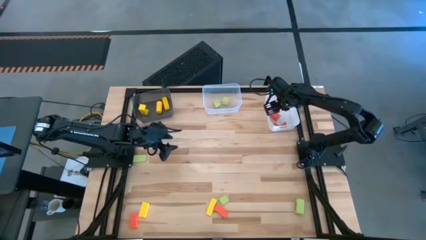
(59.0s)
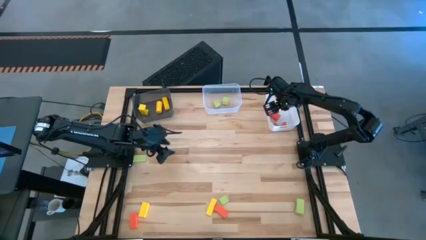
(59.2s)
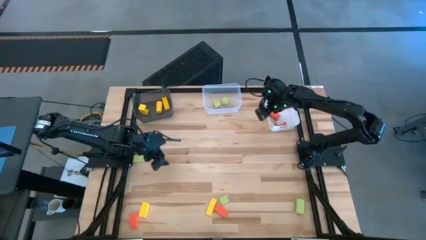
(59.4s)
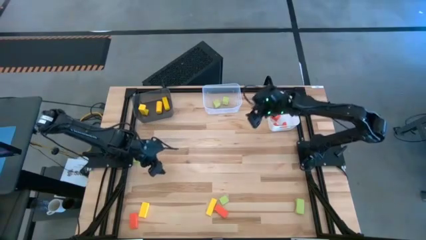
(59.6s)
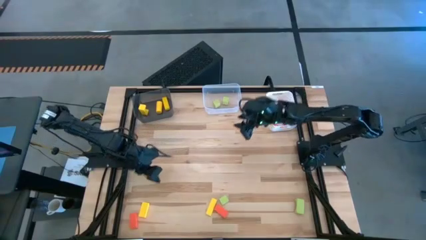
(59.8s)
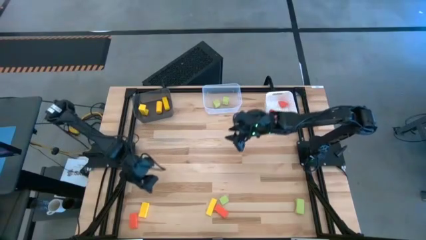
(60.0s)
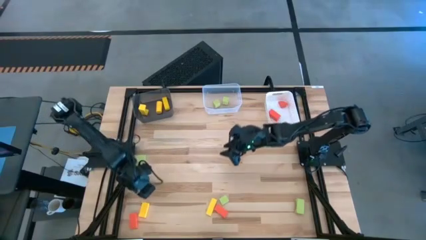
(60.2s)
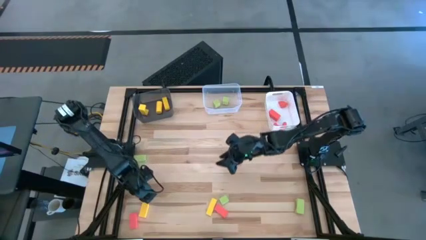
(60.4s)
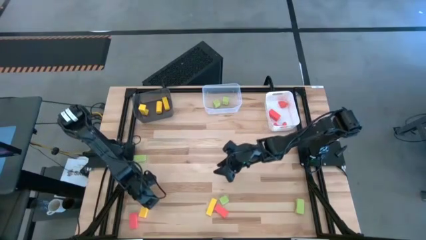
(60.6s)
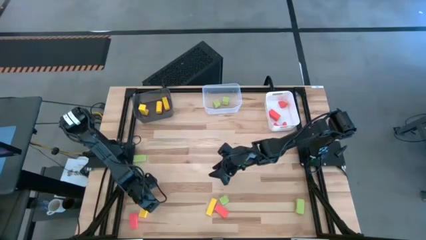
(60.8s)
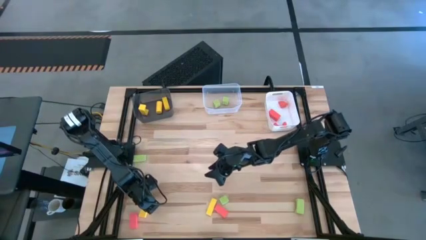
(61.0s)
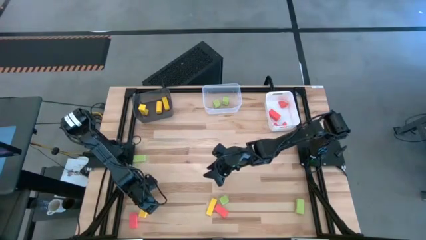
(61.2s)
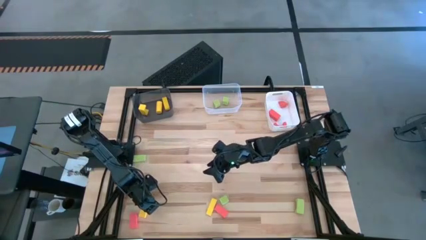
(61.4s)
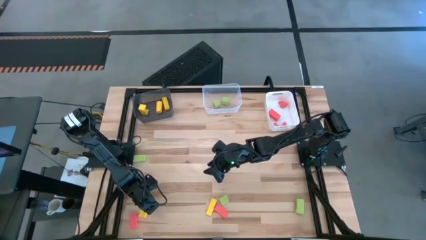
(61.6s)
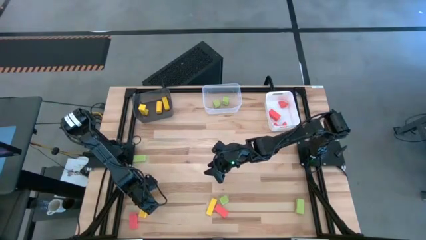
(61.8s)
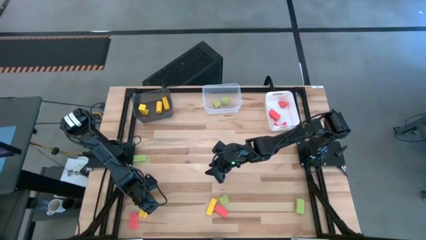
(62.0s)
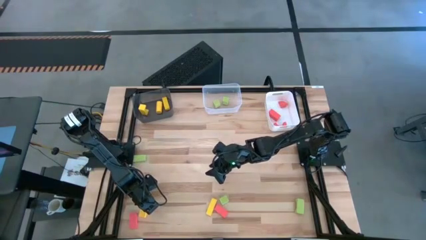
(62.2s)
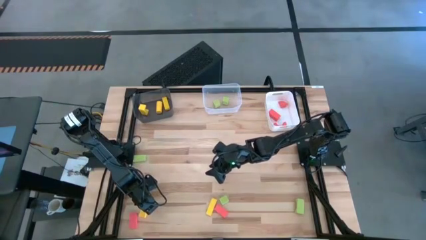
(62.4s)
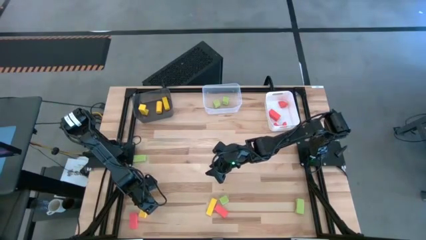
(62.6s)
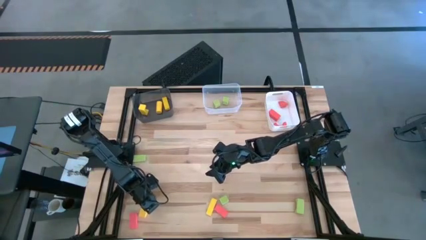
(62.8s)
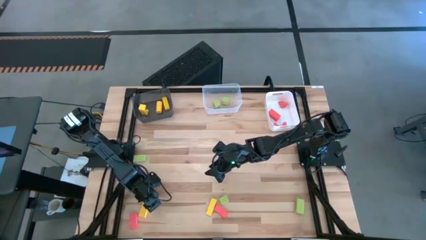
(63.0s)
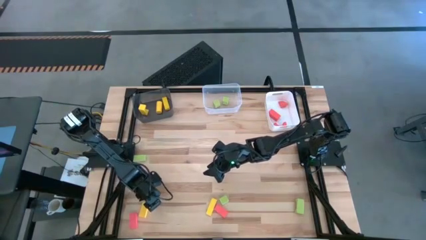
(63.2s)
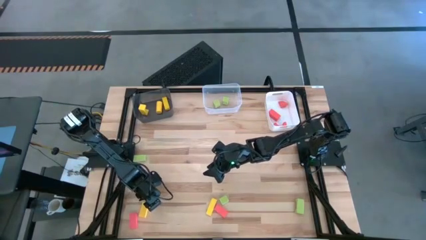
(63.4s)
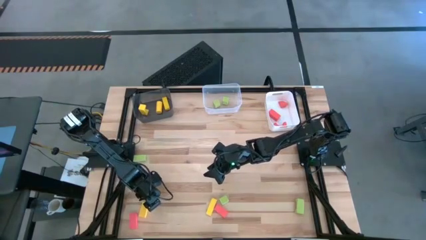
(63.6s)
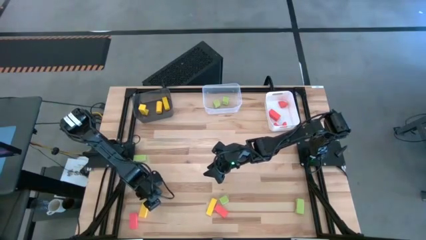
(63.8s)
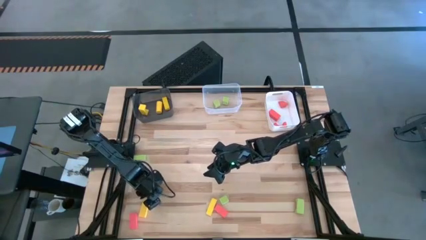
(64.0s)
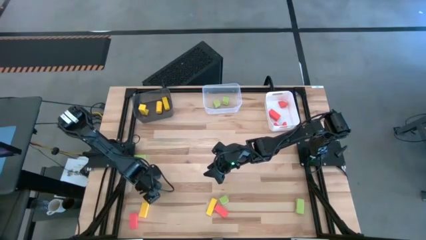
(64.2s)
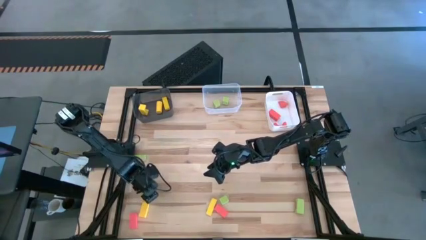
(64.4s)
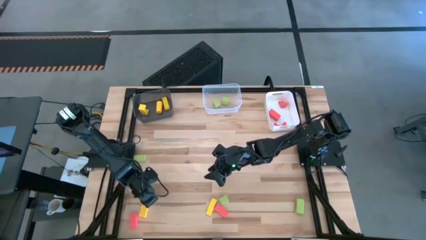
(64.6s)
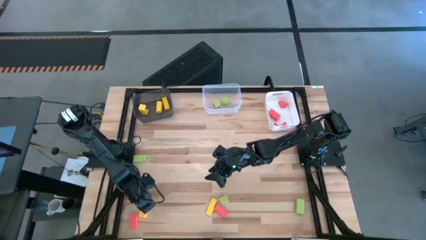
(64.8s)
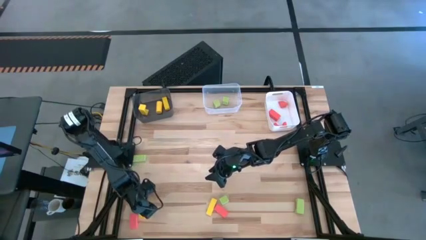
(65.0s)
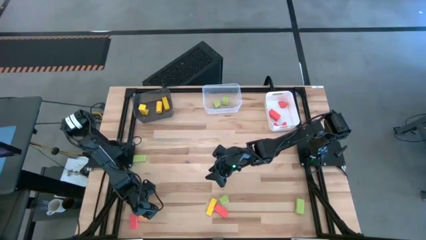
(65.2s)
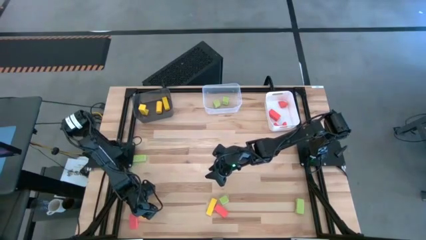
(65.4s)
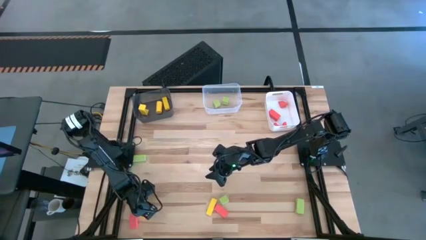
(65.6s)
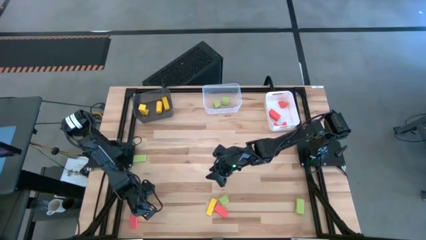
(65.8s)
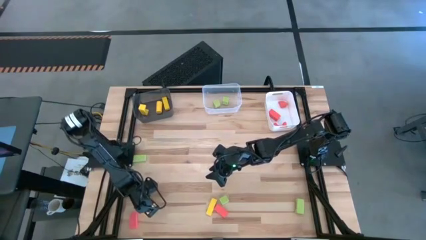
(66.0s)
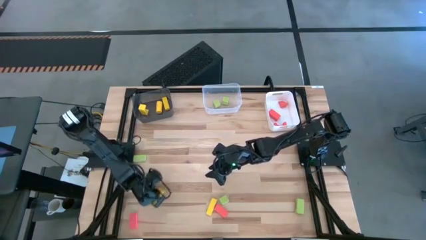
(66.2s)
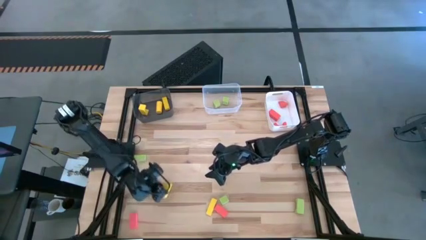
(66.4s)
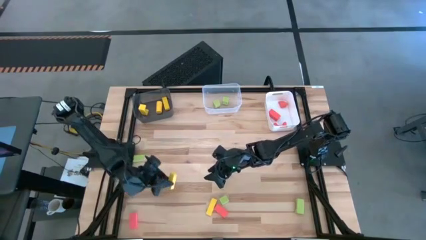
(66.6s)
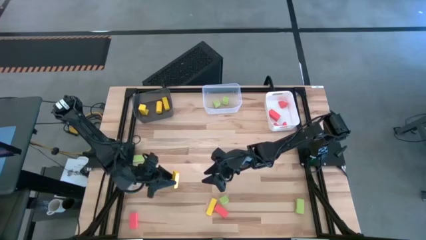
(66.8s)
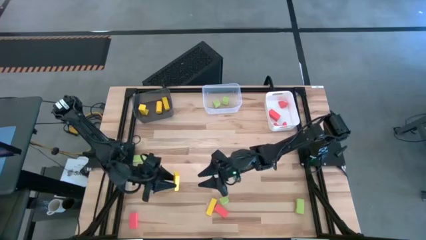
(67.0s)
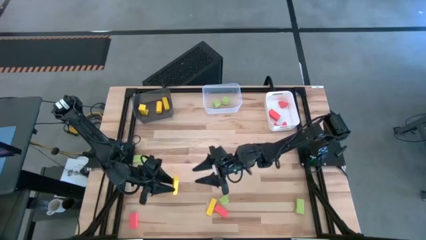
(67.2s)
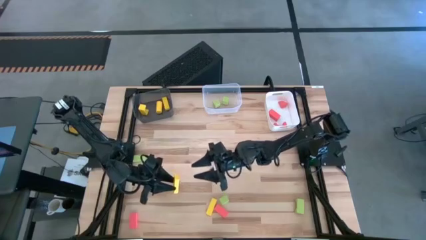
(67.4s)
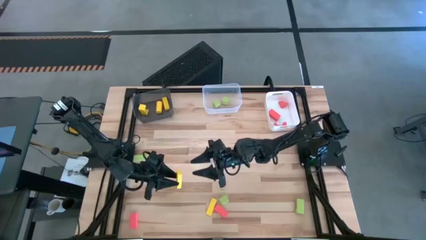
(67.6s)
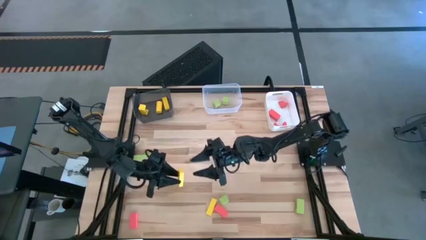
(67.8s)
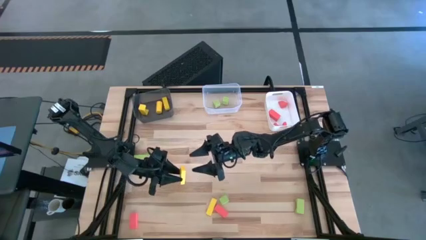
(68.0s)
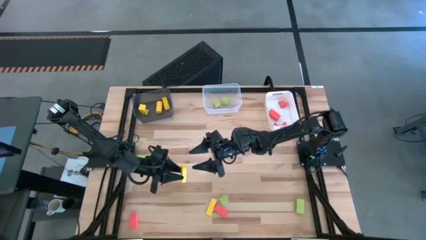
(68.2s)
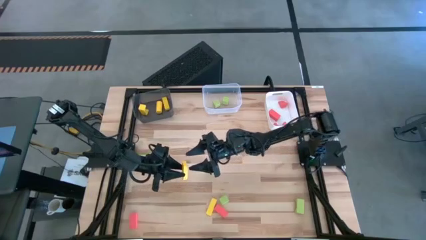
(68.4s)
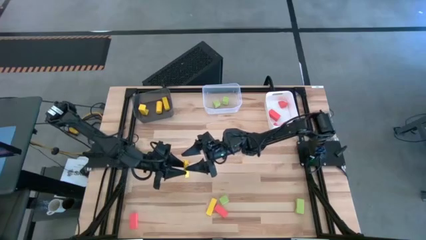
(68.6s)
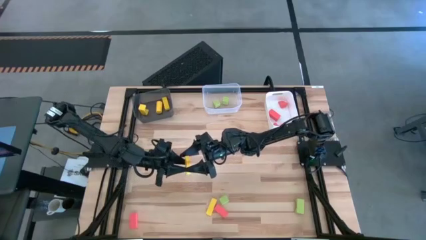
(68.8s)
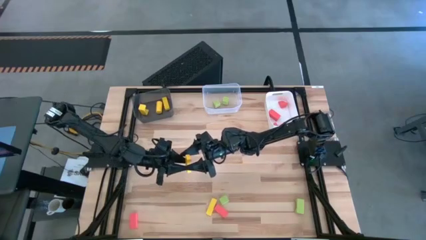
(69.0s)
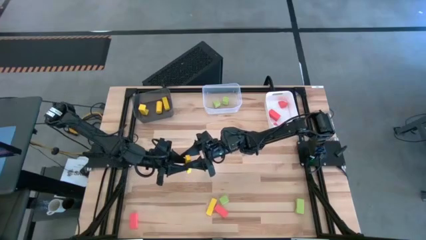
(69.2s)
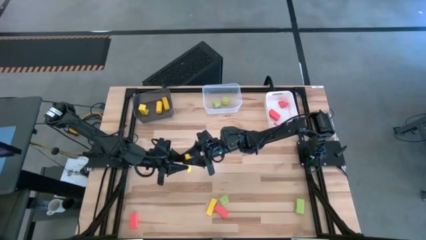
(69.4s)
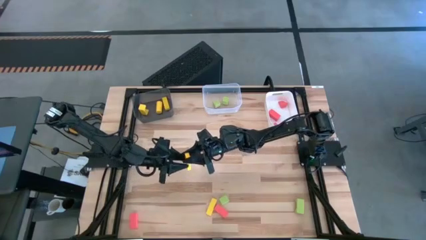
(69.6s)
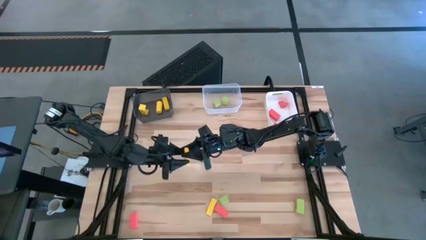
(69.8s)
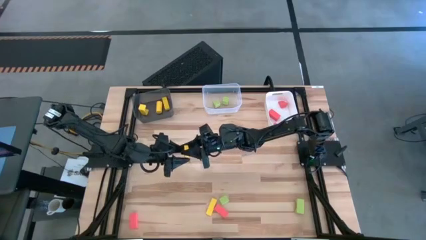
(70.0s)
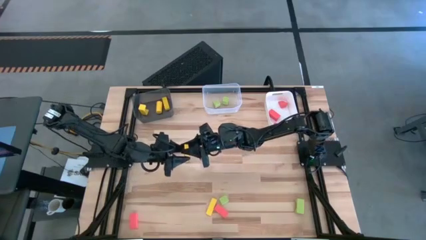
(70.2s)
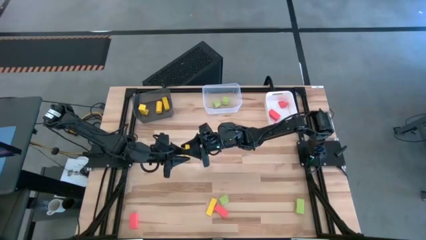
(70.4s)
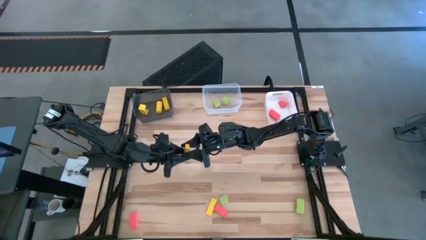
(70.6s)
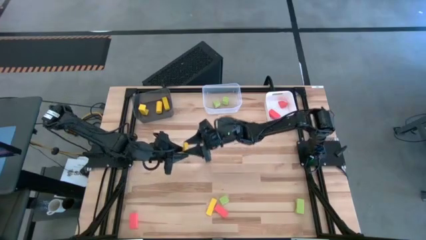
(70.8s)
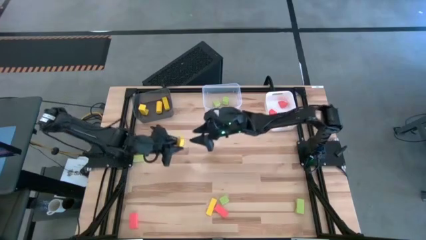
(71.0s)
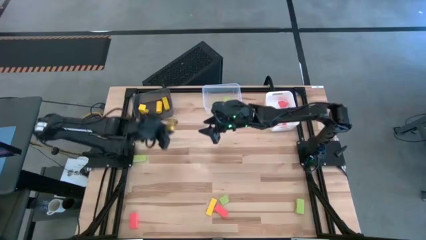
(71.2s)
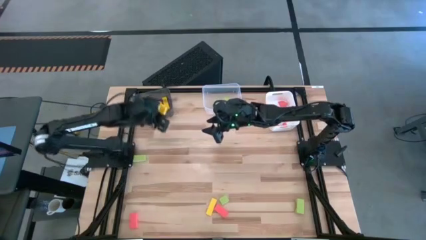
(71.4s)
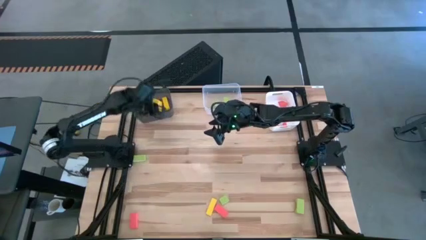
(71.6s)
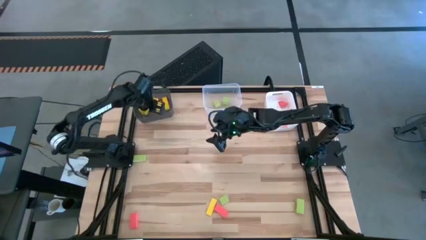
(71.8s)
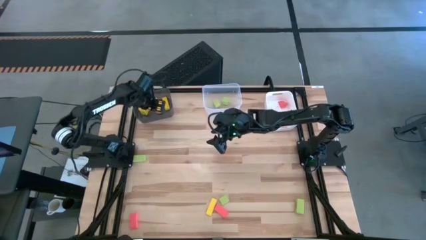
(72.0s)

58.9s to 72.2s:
Task: Sort & place blocks by color
Put the yellow block into the black bin
